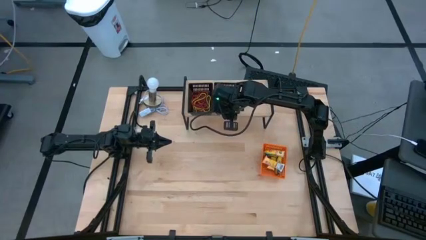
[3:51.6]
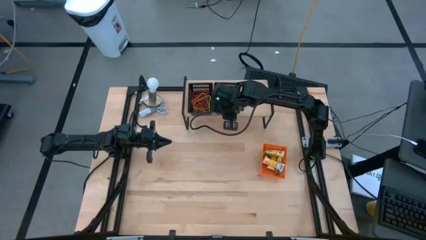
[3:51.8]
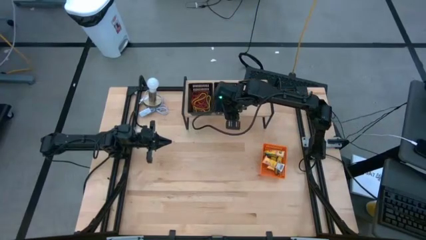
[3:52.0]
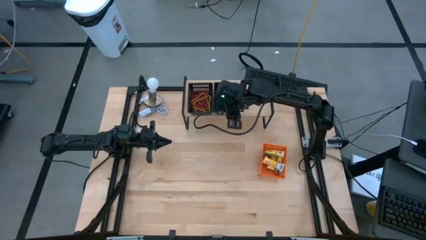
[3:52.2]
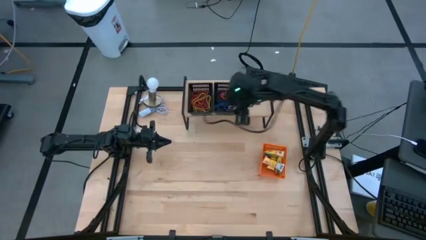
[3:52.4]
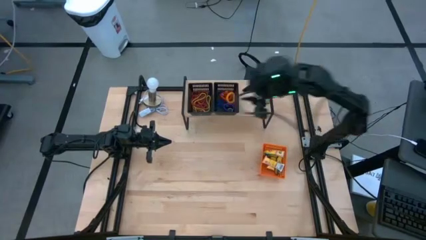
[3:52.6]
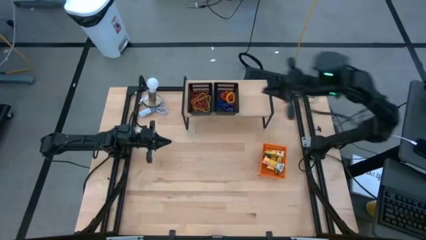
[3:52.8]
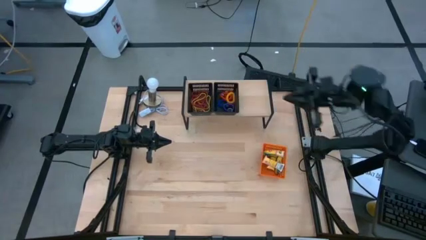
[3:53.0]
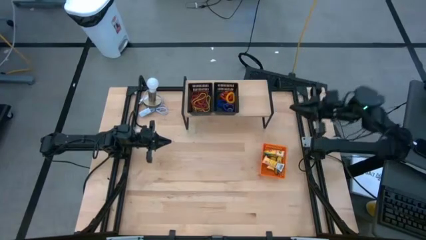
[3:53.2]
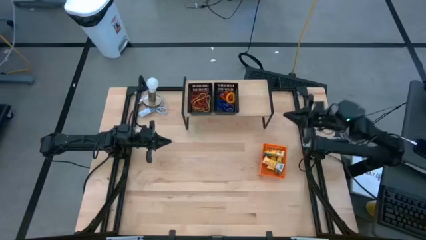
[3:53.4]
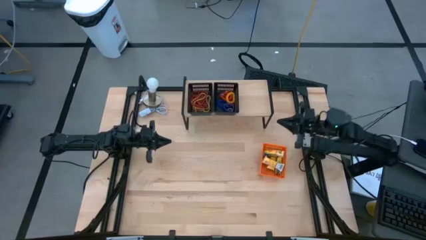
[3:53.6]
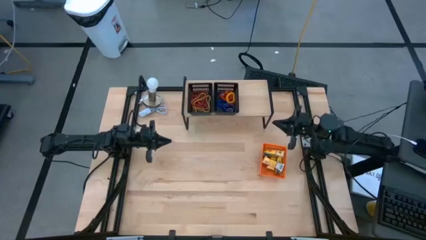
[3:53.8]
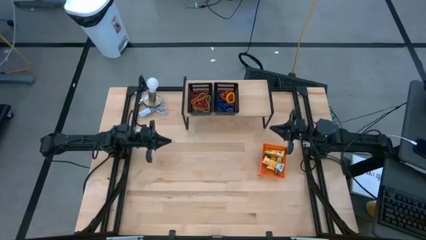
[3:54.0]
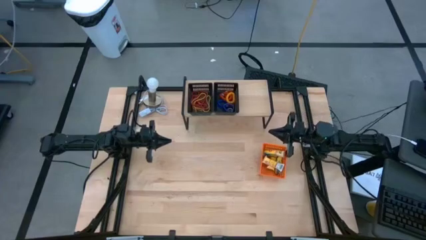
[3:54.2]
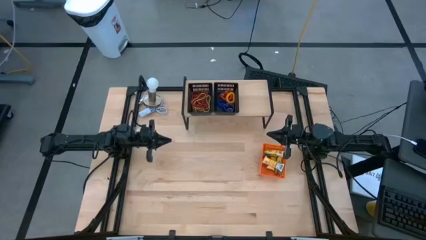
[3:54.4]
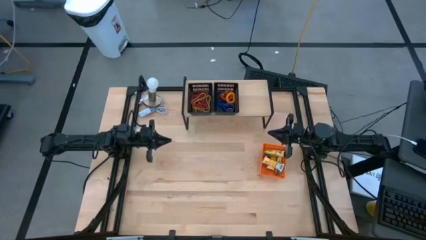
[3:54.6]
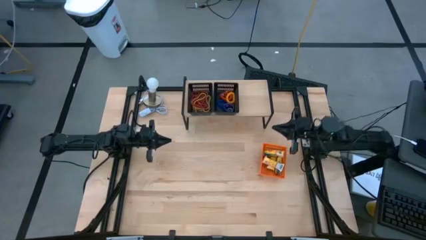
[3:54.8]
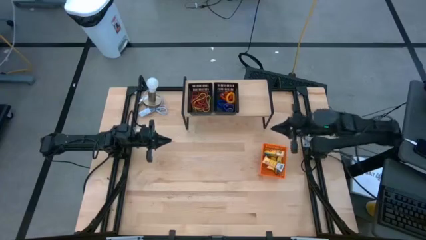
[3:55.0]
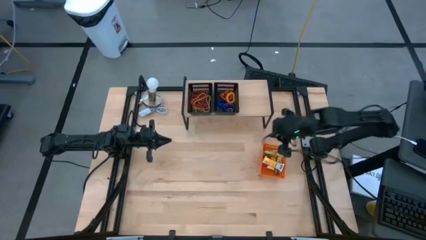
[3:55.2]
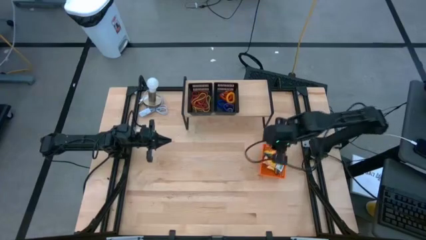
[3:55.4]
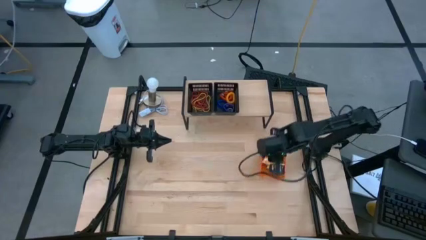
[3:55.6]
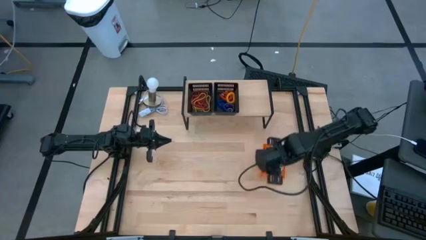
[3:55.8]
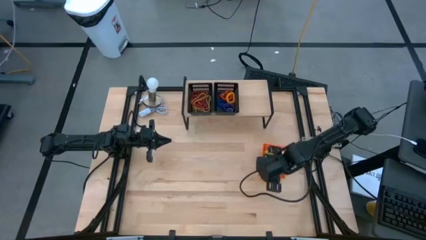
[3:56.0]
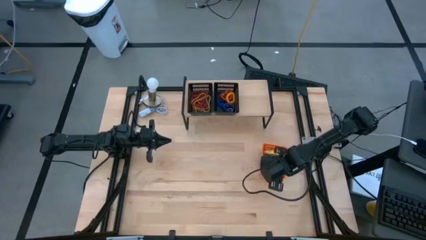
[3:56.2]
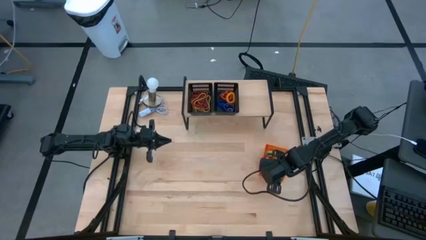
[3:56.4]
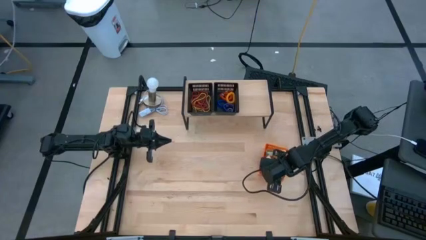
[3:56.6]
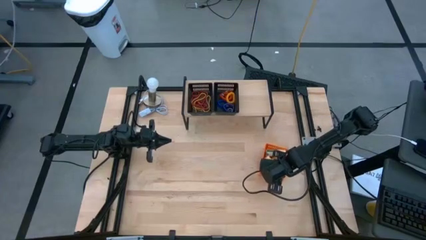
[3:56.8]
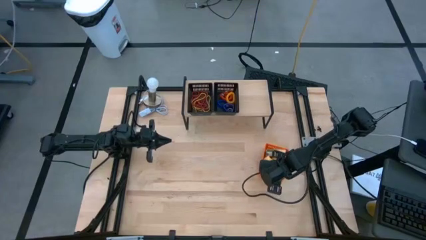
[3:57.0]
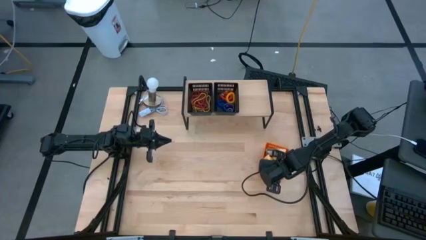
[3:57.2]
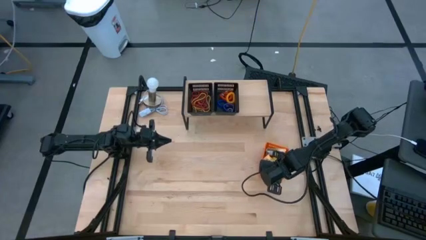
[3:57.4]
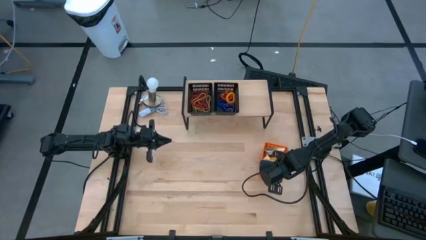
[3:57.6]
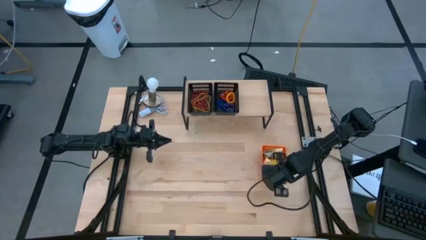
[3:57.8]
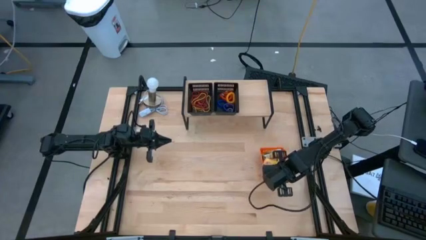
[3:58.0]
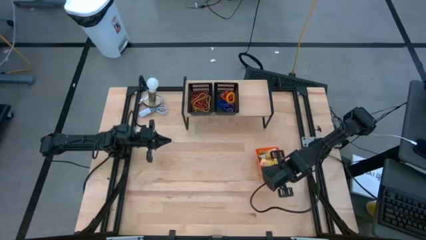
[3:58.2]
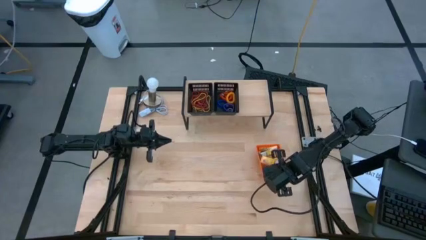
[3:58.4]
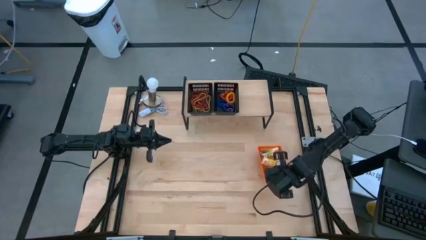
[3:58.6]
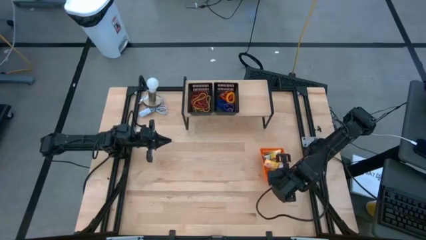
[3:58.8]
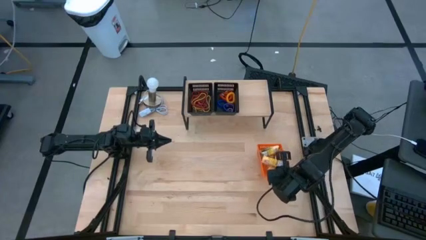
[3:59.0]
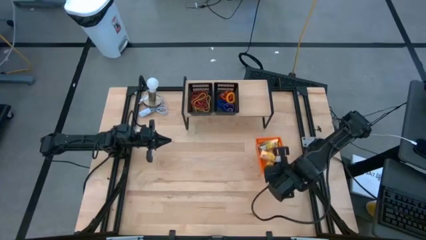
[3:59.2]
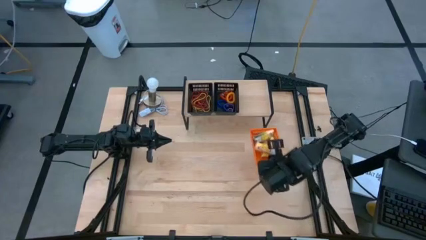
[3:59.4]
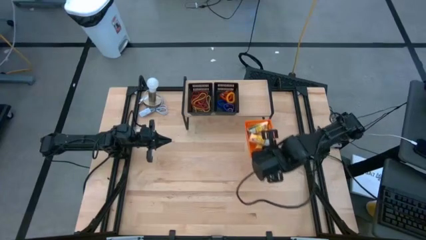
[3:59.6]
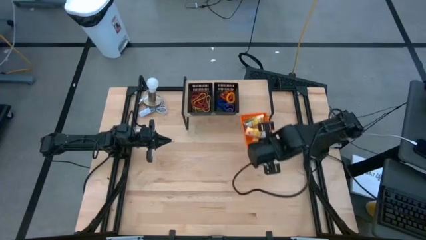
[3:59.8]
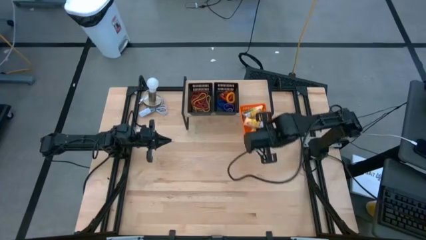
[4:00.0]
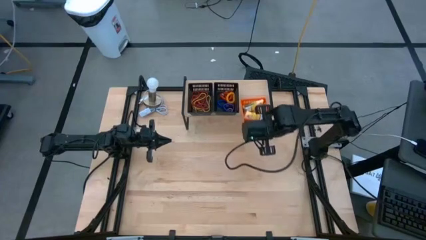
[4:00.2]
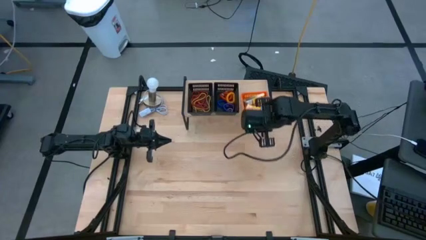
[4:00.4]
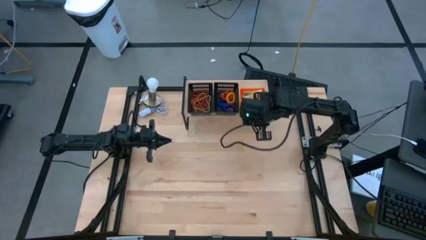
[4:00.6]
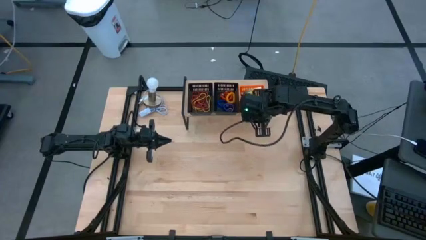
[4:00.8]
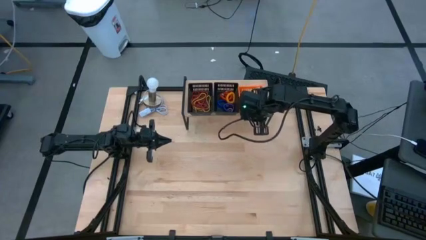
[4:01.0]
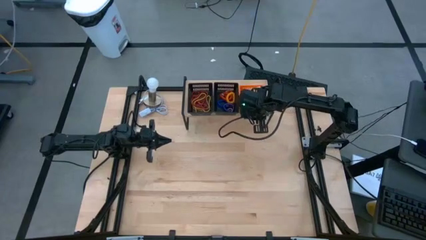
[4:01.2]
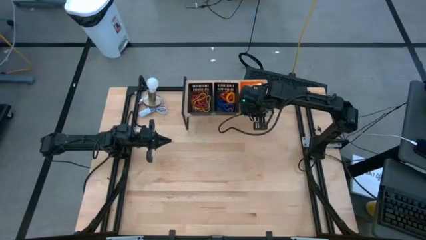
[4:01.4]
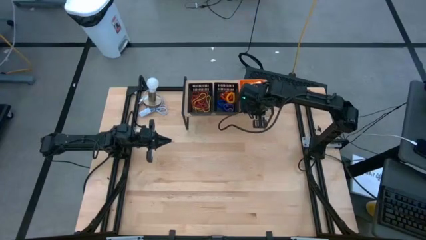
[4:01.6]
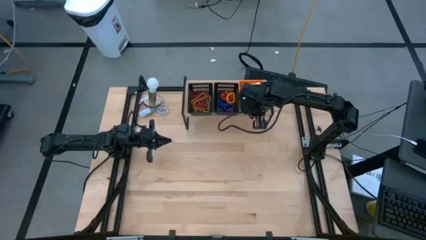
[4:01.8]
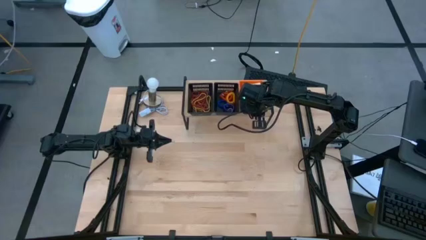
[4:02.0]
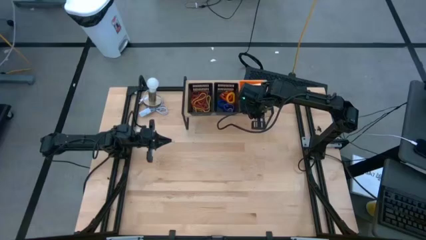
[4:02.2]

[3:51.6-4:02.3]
Task: Pick & Place Office Desk Supplies
Put the orange bin with the crayon boxes on the shelf

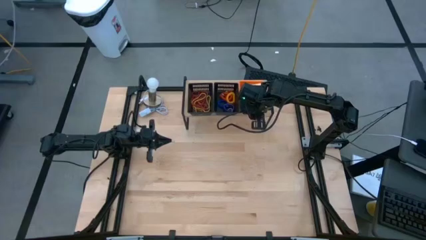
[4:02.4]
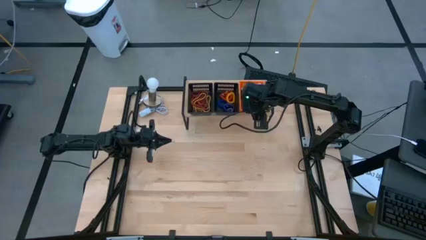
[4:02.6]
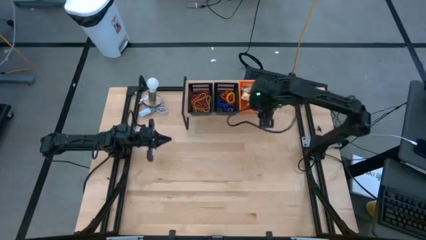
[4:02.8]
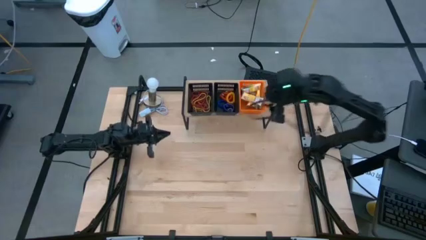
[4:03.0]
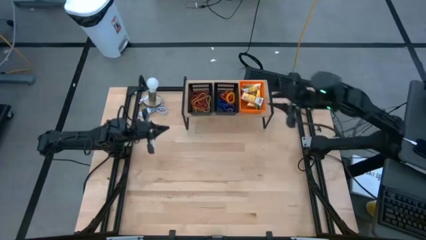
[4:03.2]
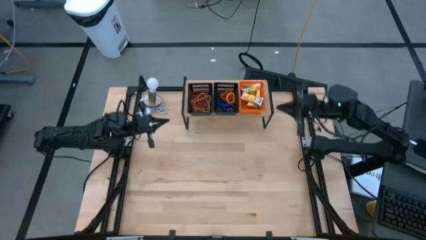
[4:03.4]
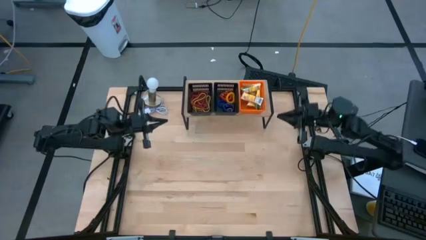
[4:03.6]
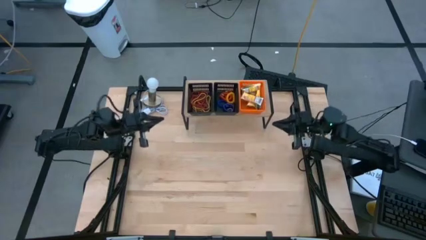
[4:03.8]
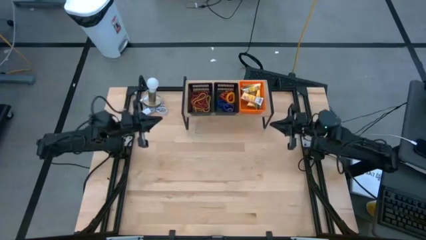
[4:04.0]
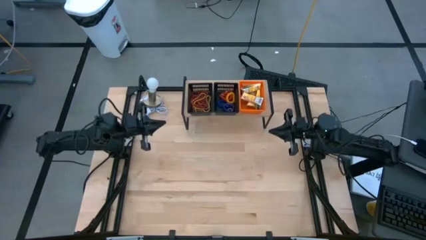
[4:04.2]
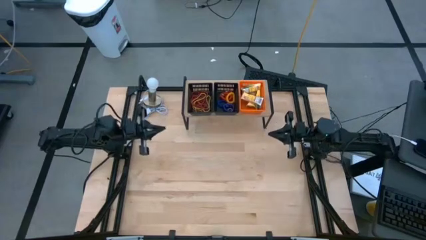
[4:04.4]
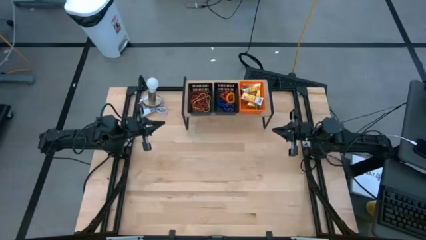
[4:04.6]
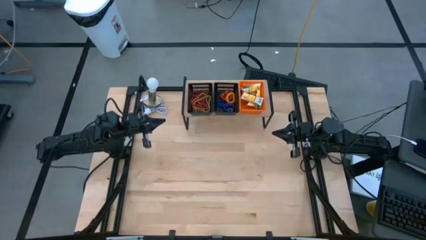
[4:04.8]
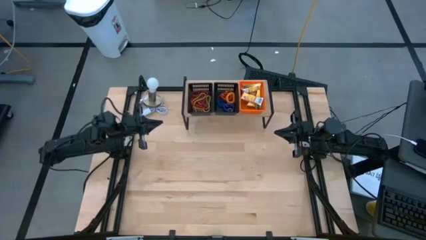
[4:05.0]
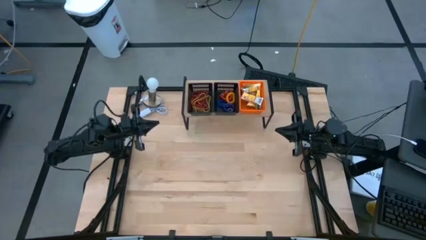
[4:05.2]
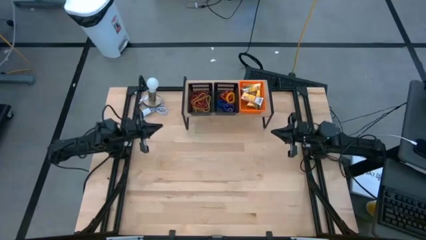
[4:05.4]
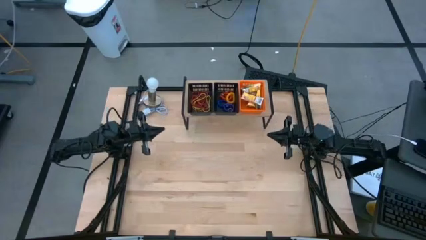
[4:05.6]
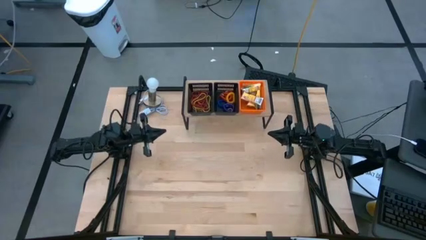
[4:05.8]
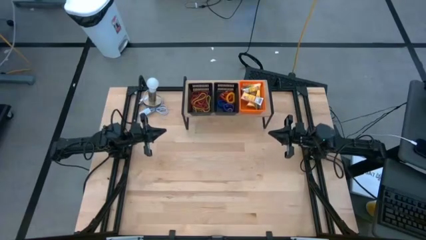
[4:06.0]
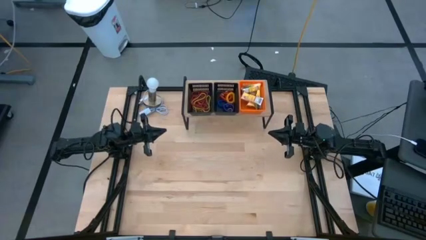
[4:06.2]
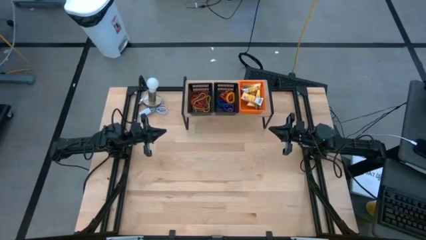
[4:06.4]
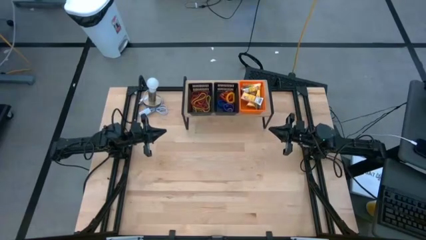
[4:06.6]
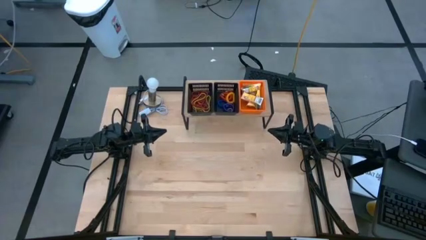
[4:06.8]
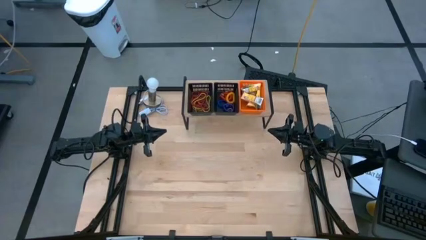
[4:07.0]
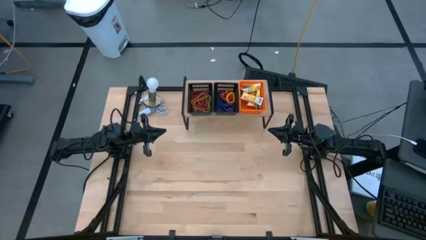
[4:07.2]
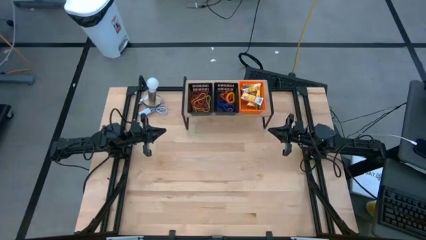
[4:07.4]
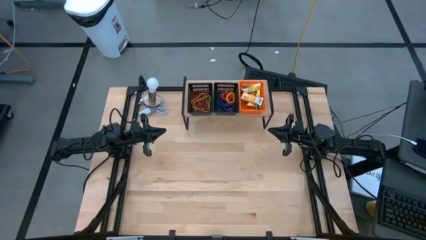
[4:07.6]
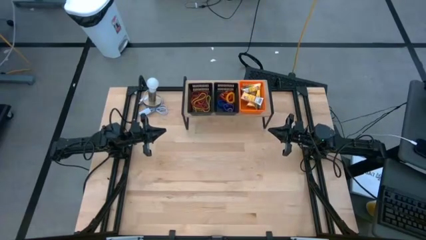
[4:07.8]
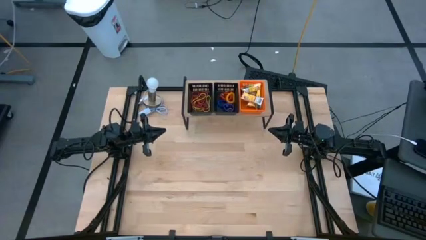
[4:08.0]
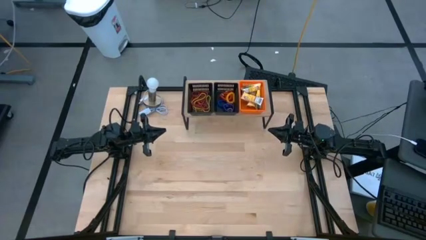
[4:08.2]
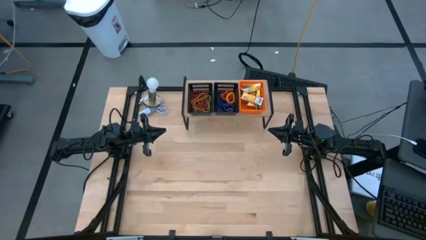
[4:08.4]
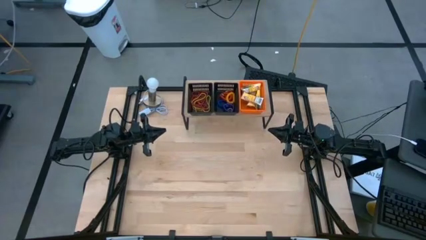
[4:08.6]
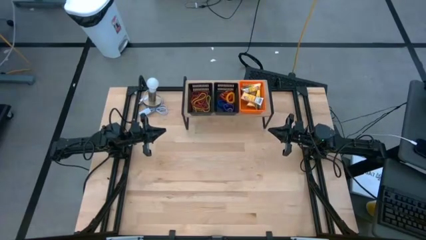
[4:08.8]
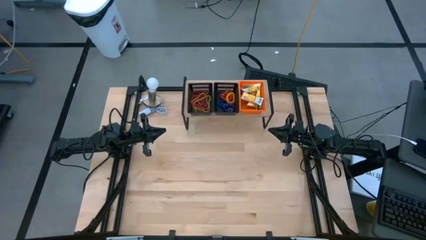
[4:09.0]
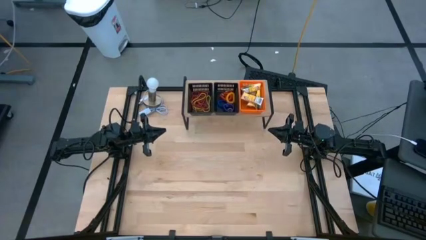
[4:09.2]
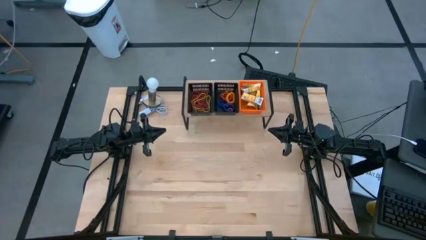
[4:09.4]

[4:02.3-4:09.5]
Return to Home Position
